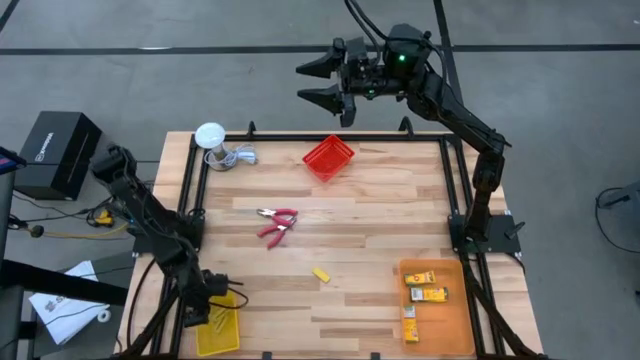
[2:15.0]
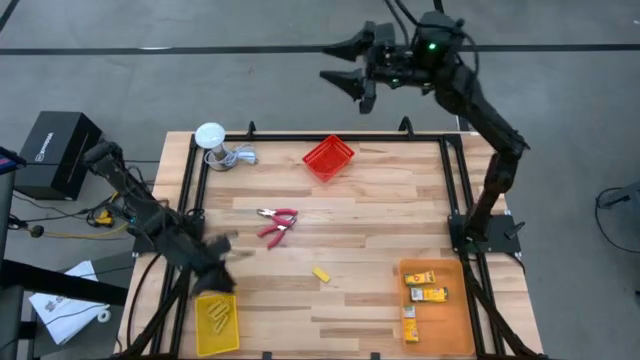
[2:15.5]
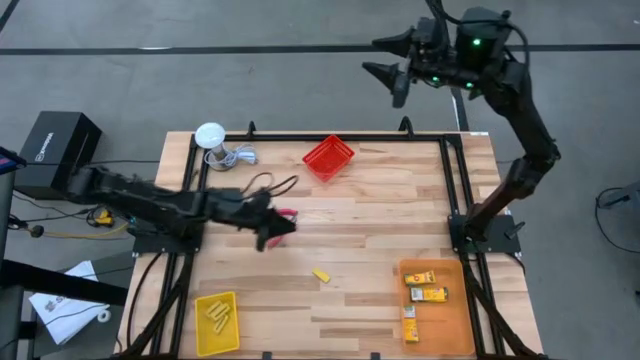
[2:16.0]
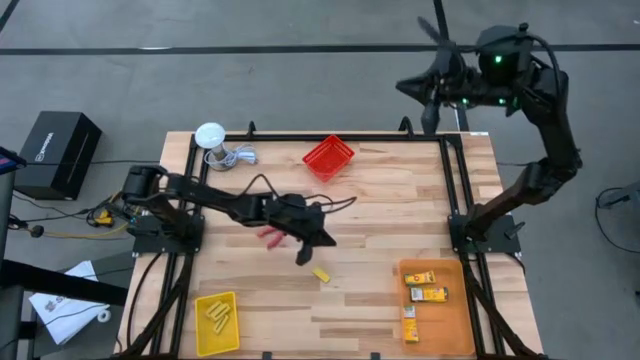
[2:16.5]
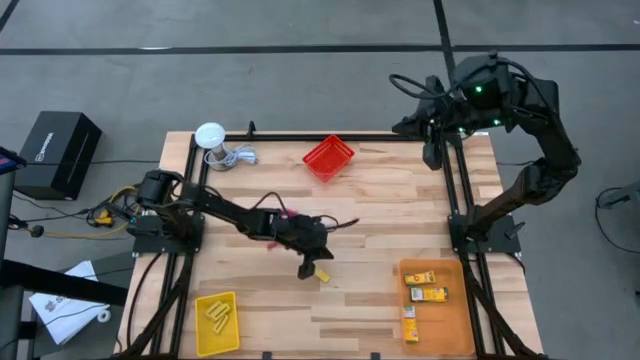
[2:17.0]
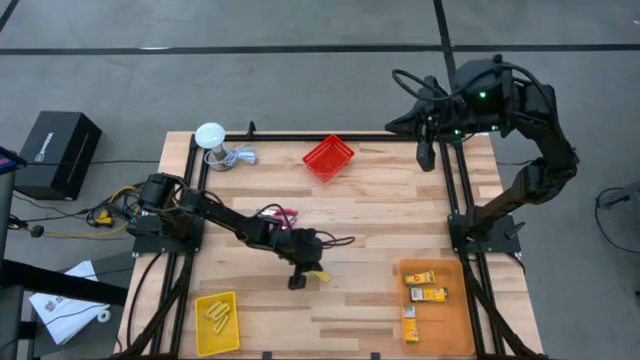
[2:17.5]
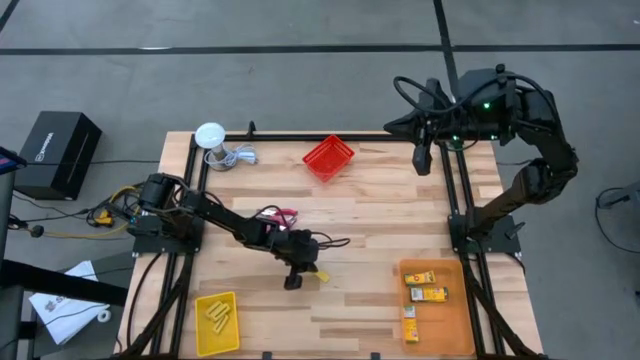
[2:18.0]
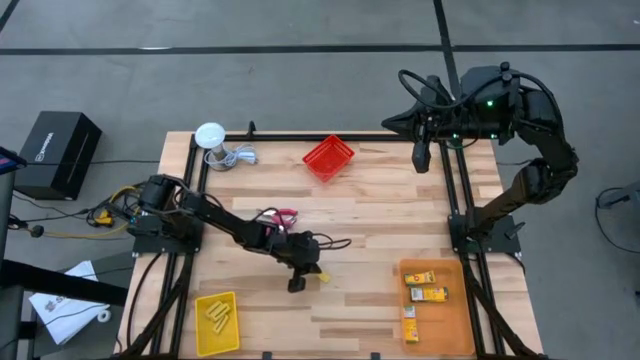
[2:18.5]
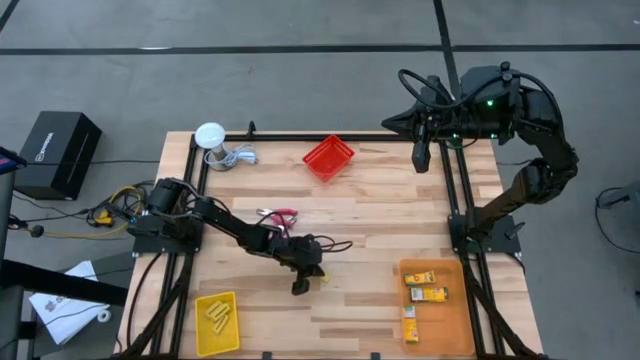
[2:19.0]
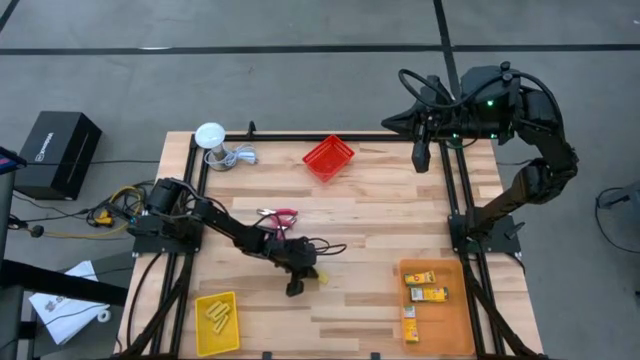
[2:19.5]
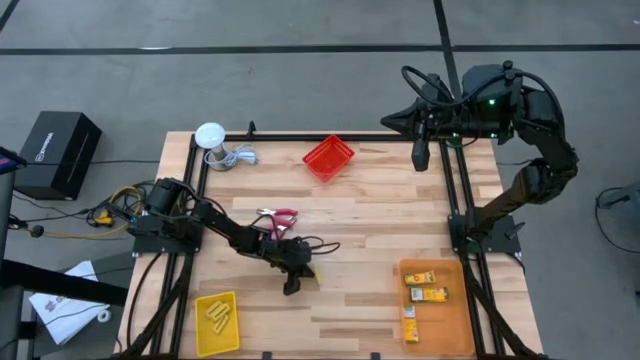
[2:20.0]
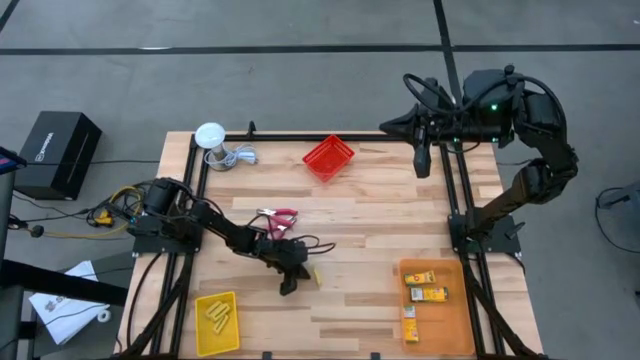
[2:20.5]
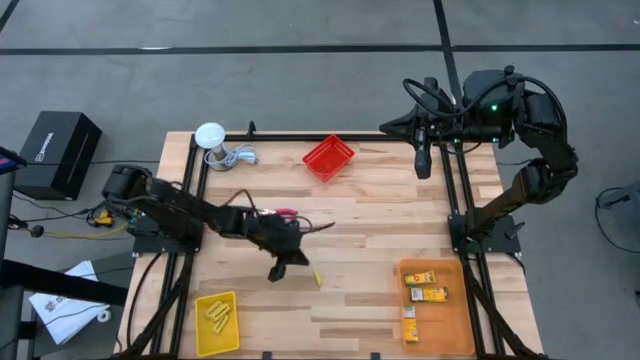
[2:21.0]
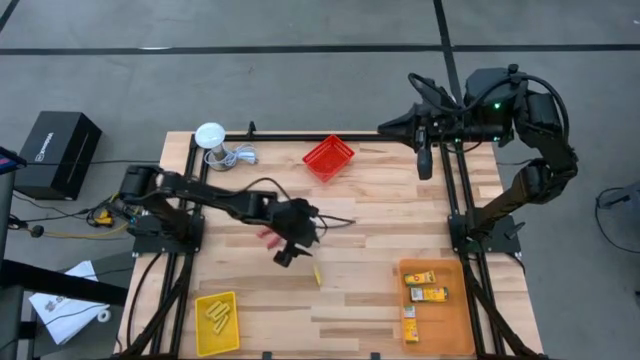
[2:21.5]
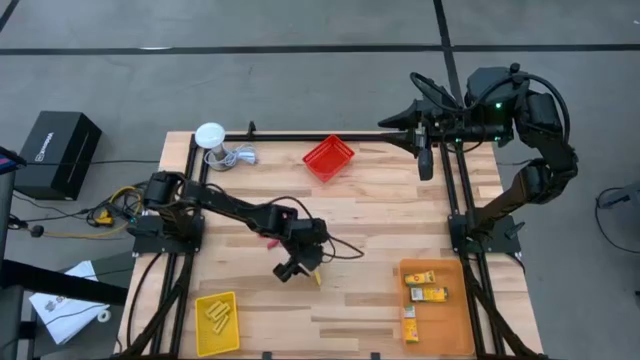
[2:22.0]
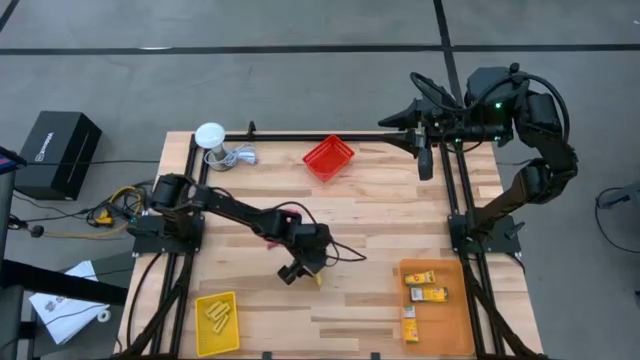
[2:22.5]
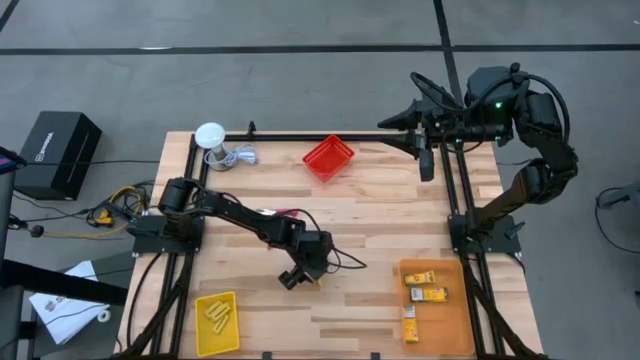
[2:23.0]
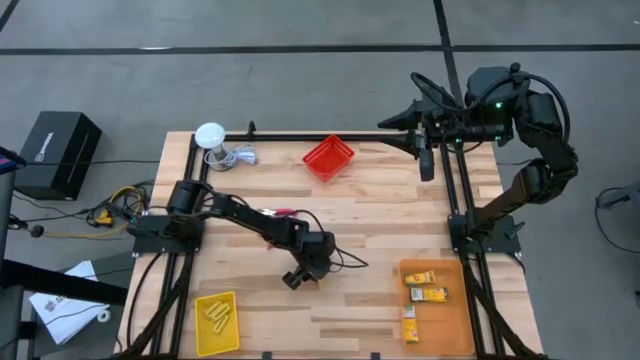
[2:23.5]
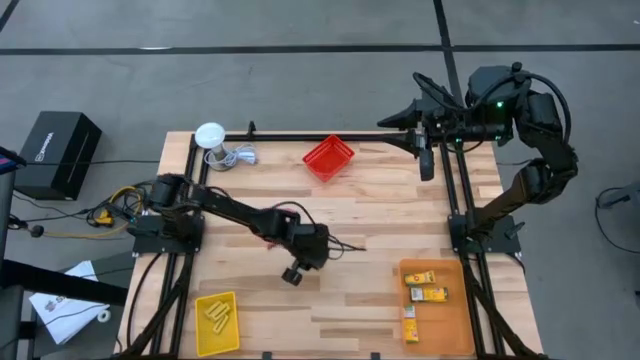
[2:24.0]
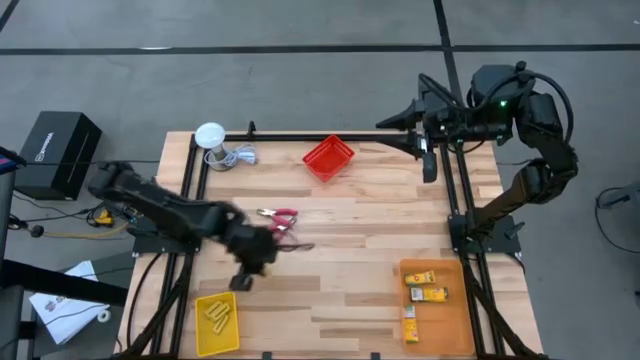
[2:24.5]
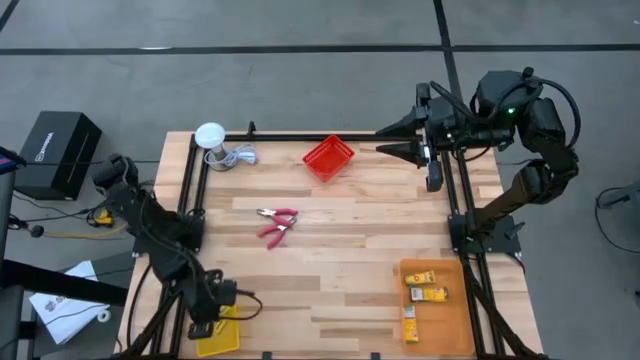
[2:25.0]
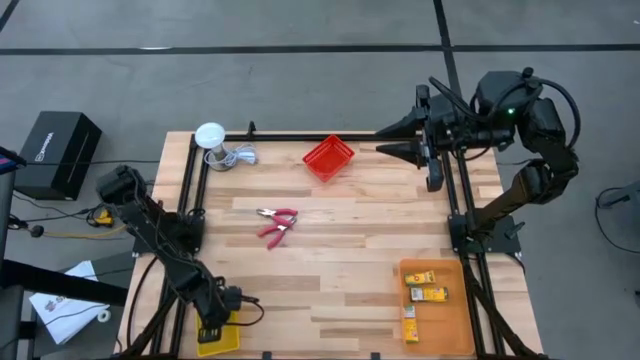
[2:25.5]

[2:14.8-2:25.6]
Task: Pick & Place School Supplies
Put the yellow eraser into the yellow bin

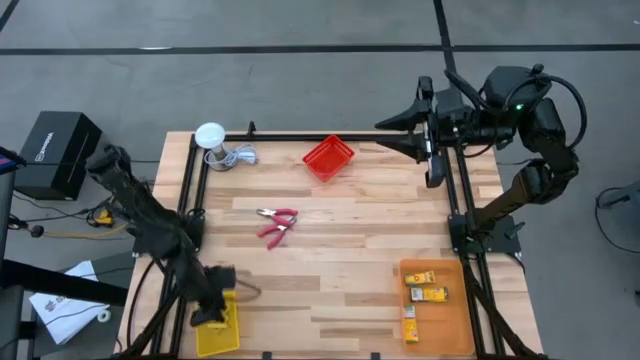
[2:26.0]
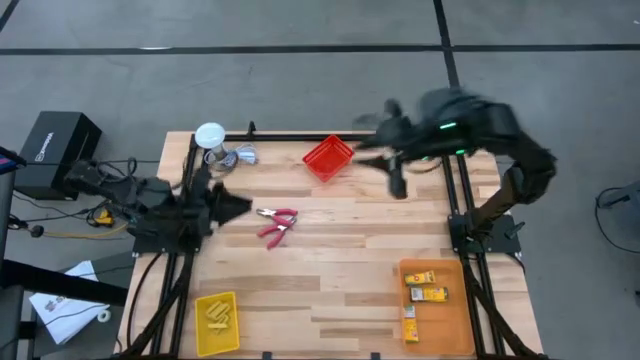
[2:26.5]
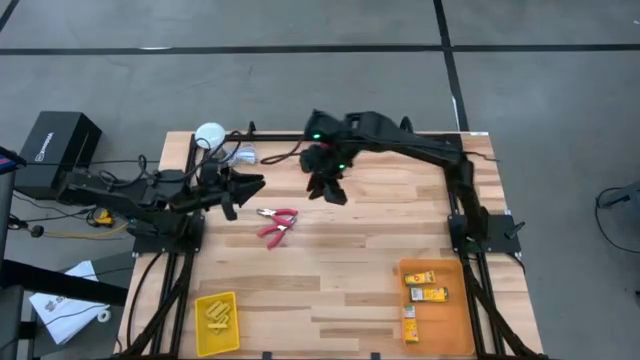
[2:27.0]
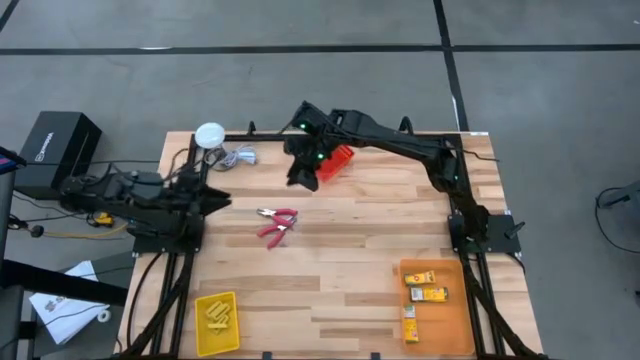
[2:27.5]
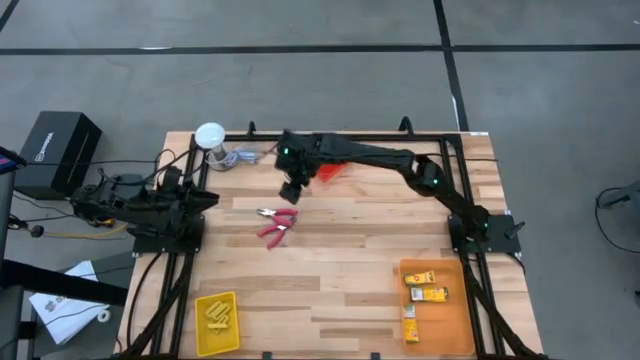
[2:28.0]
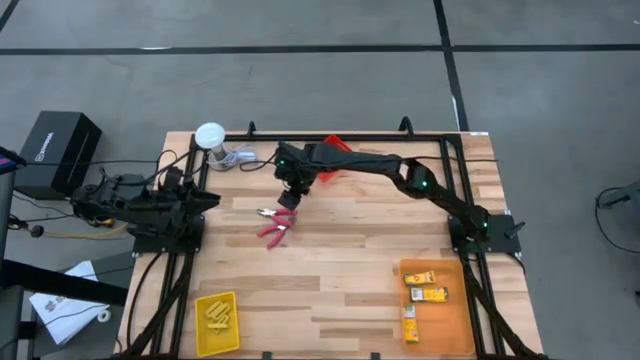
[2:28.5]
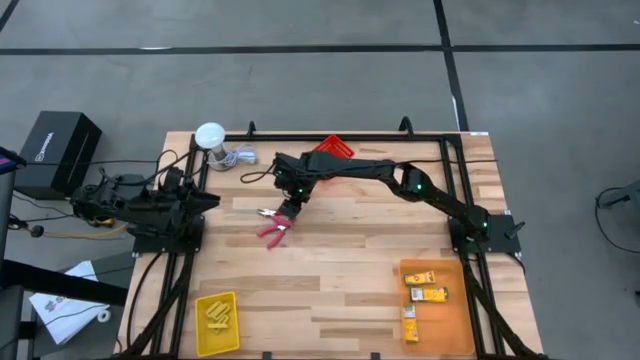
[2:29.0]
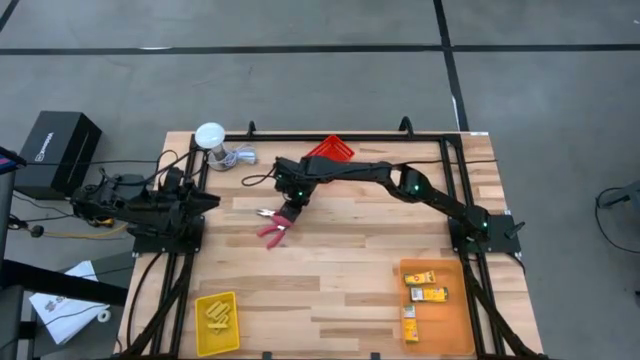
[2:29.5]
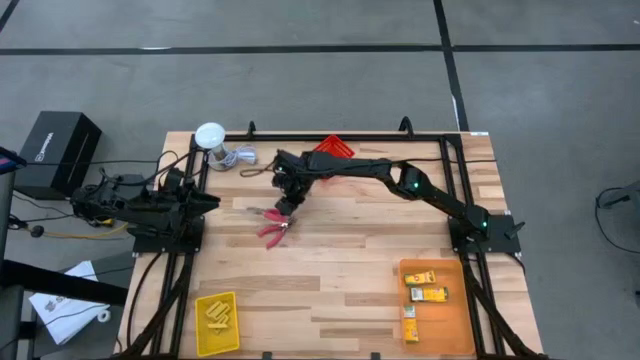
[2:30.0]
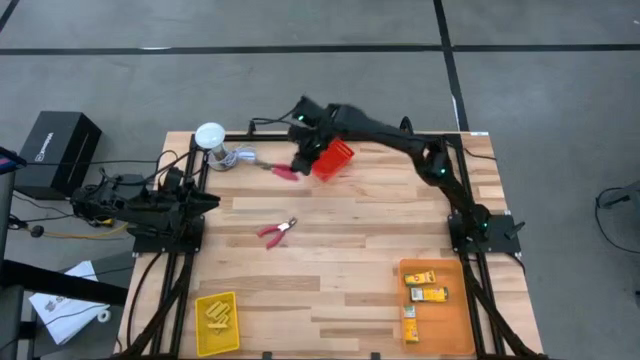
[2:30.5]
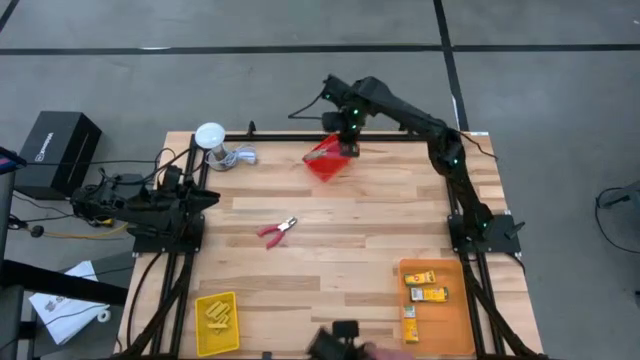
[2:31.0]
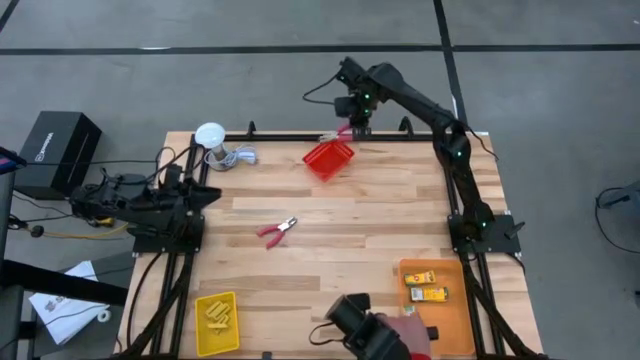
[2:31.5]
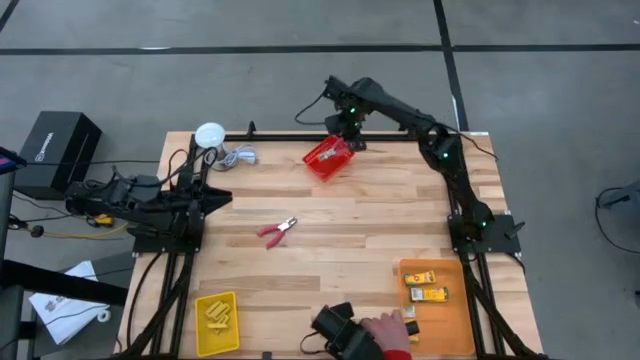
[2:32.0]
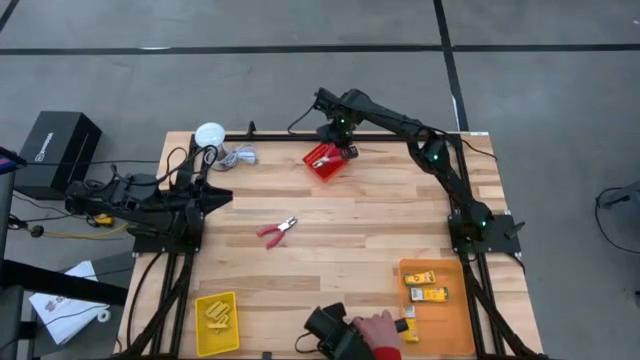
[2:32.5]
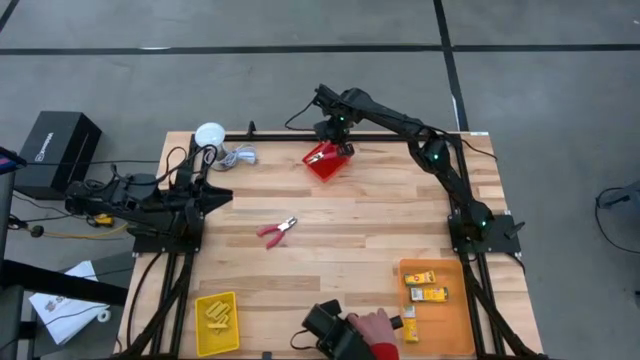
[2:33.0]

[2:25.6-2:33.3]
Put the pink hole puncher into the red bin

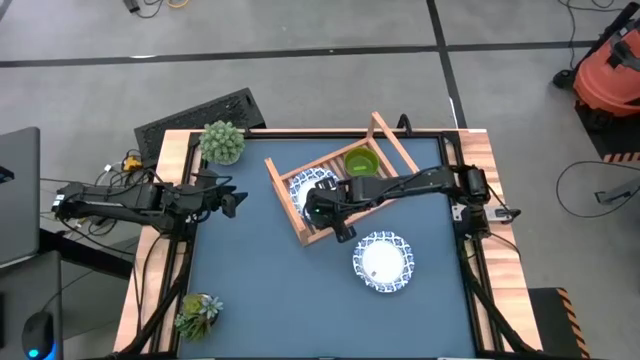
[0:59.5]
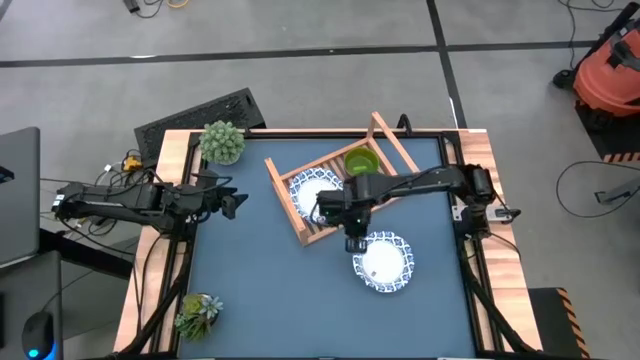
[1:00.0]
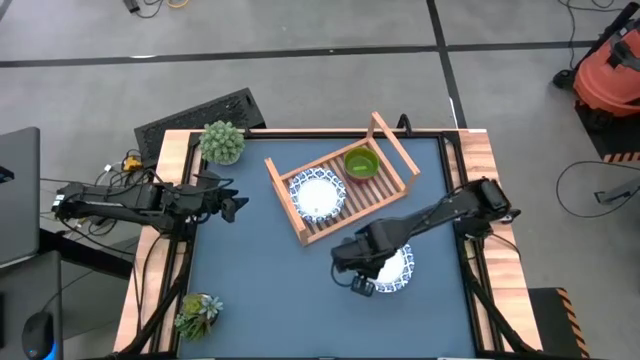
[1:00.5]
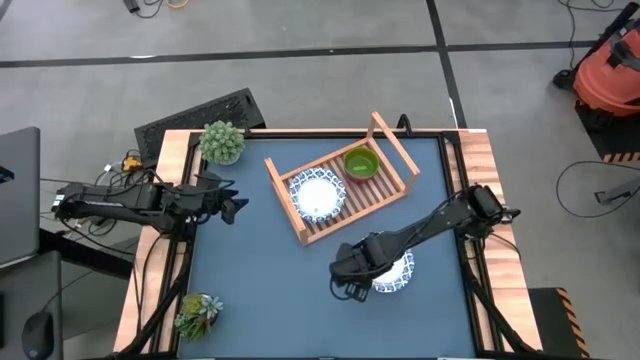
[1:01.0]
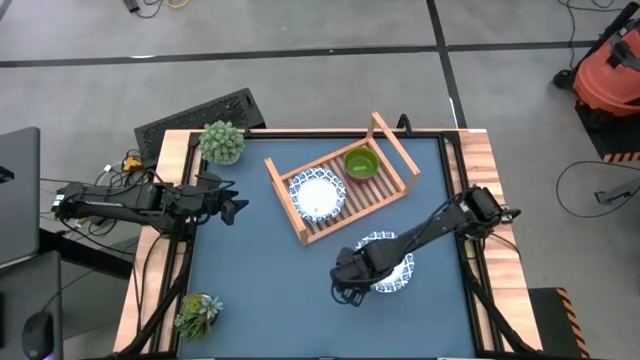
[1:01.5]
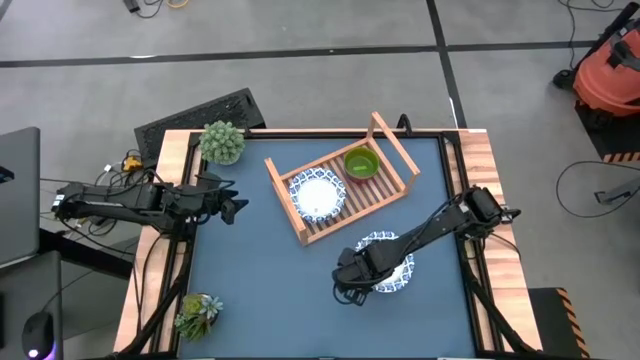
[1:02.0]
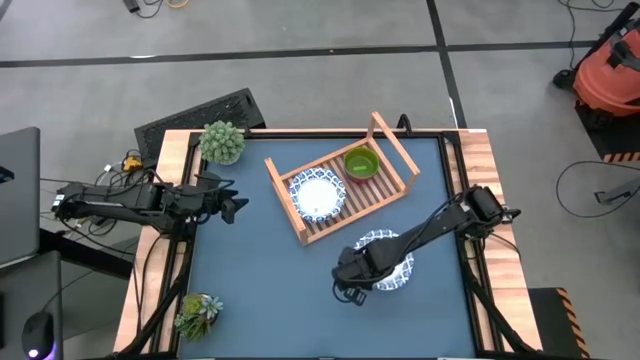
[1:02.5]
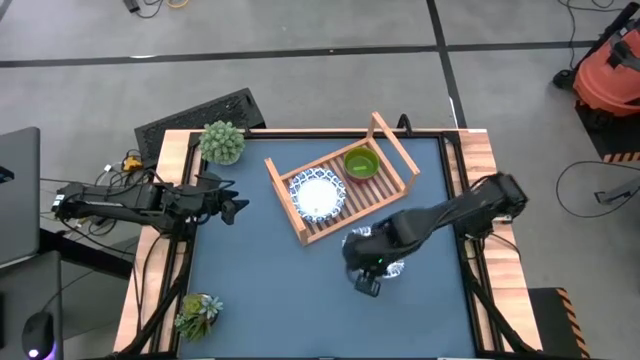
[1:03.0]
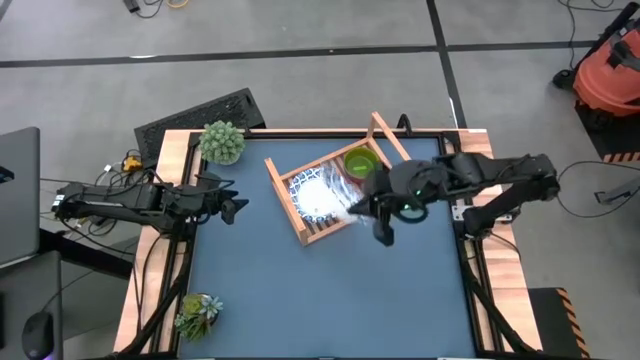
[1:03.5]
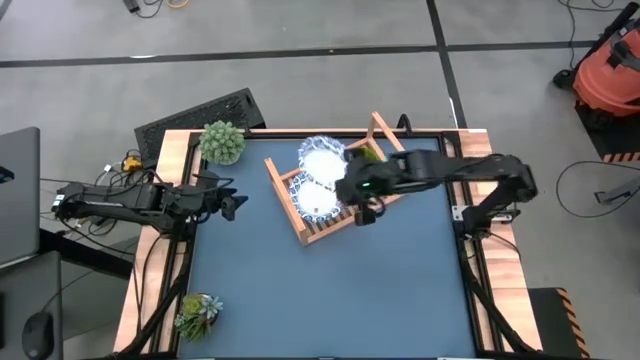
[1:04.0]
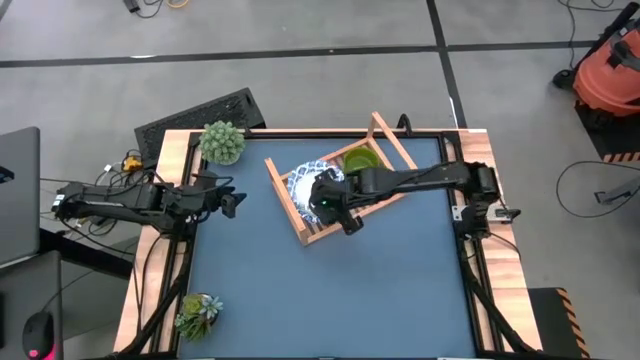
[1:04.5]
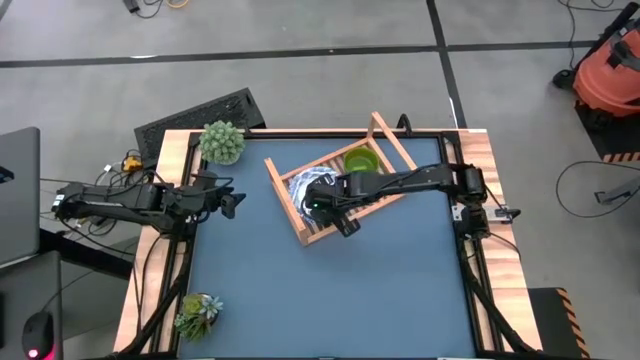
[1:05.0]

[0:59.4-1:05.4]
Task: Place and stack bowls onto a shelf
Stack the blue patterned bowl on top of the blue patterned bowl on the shelf
